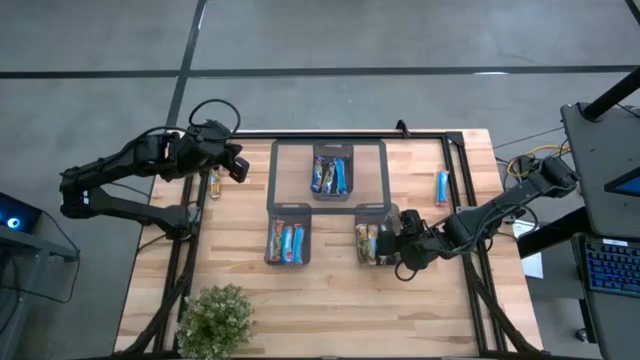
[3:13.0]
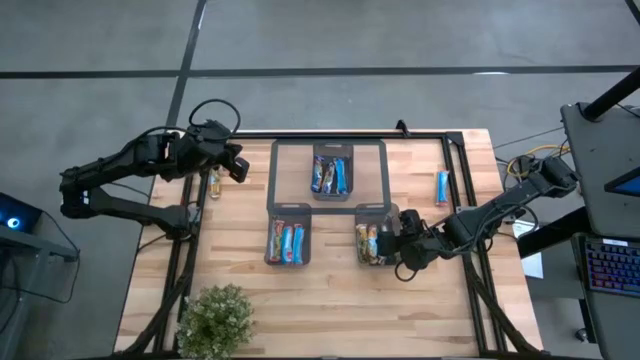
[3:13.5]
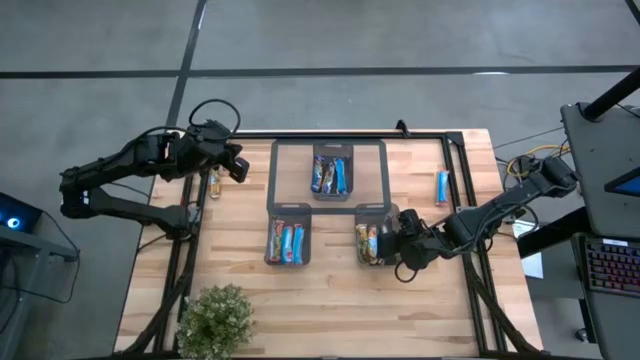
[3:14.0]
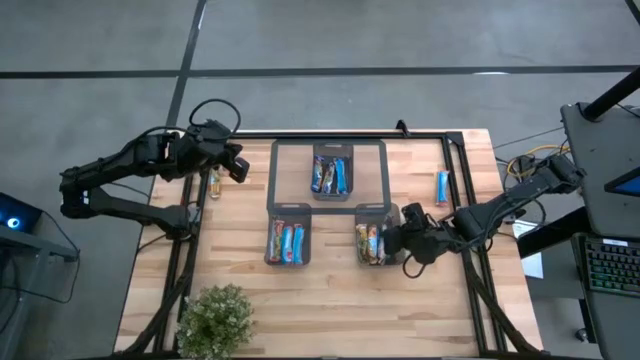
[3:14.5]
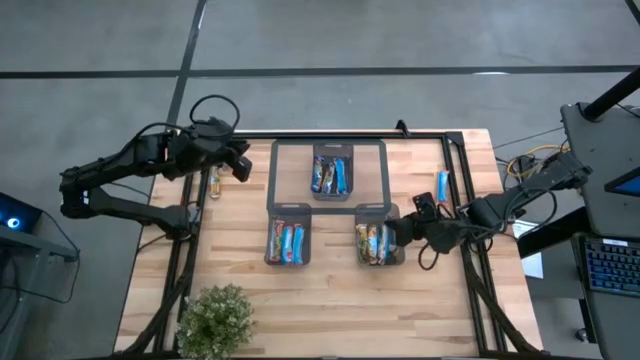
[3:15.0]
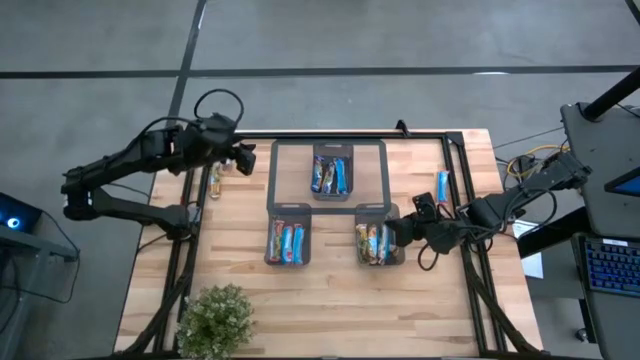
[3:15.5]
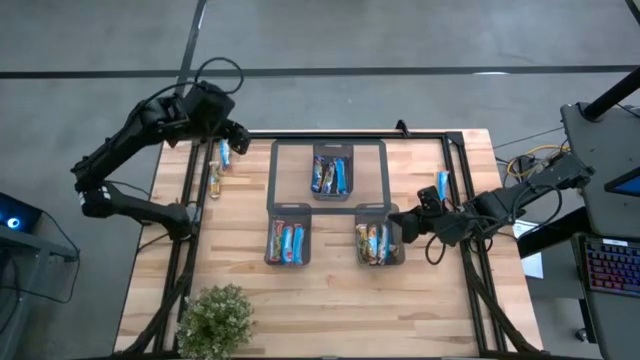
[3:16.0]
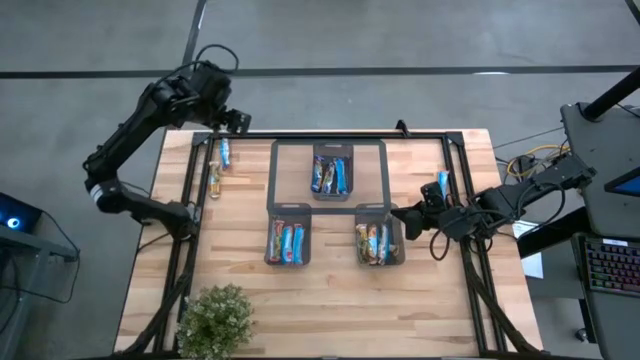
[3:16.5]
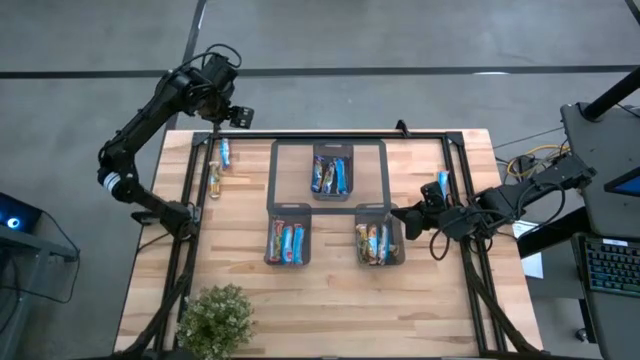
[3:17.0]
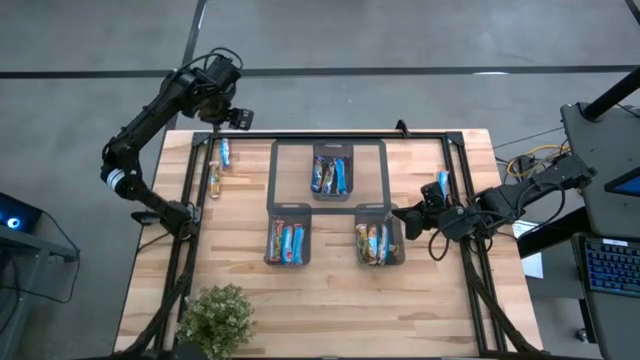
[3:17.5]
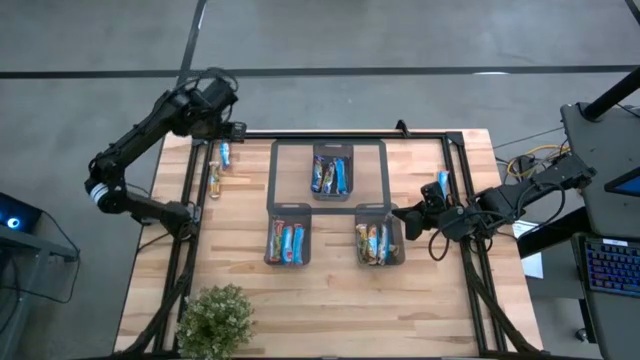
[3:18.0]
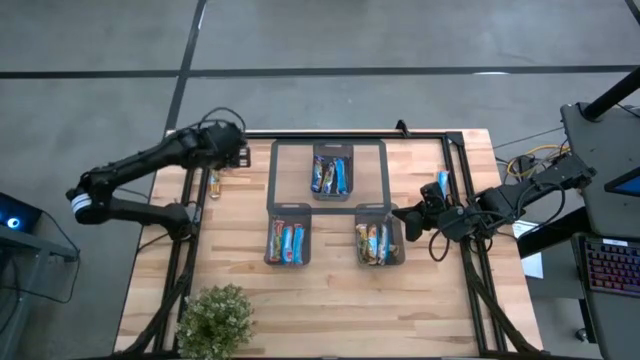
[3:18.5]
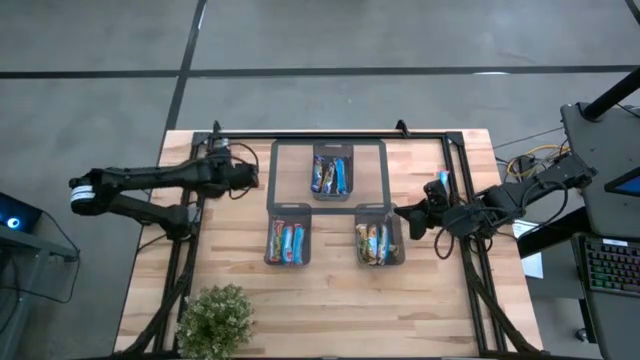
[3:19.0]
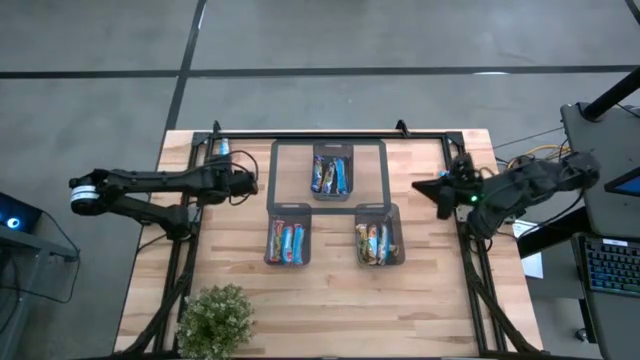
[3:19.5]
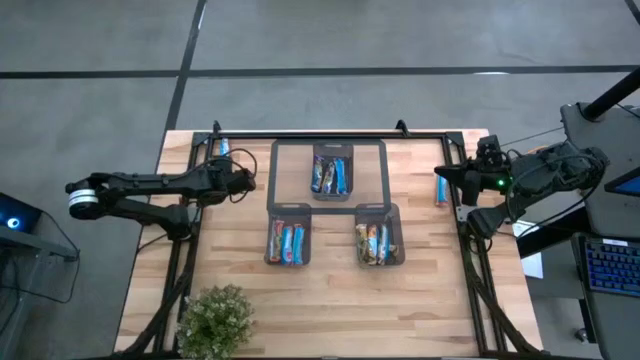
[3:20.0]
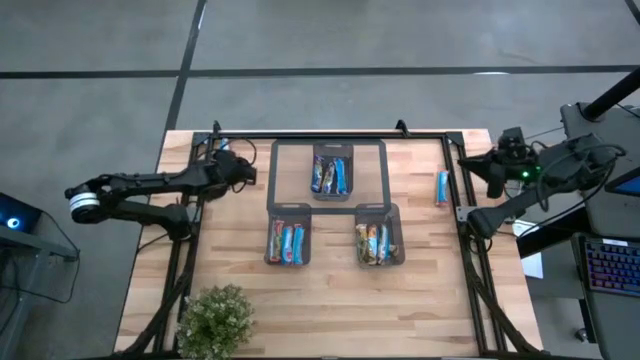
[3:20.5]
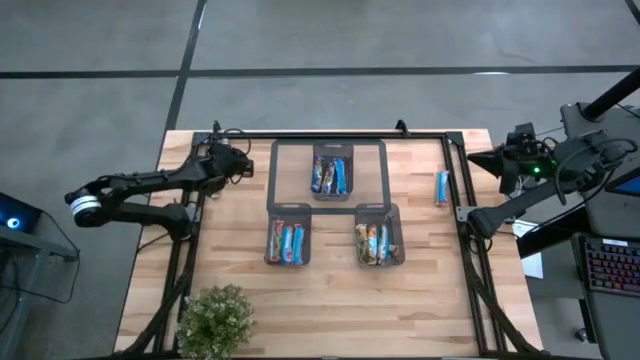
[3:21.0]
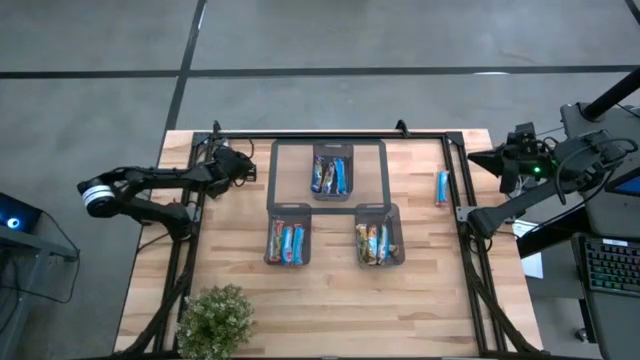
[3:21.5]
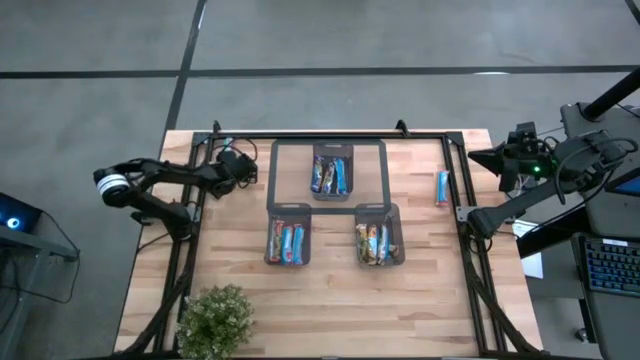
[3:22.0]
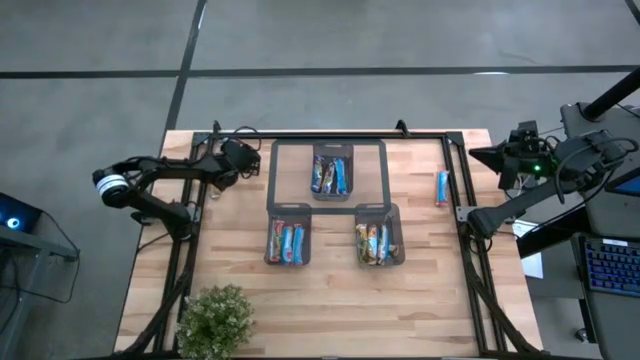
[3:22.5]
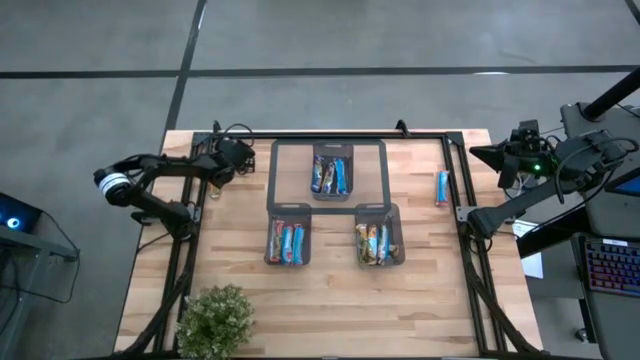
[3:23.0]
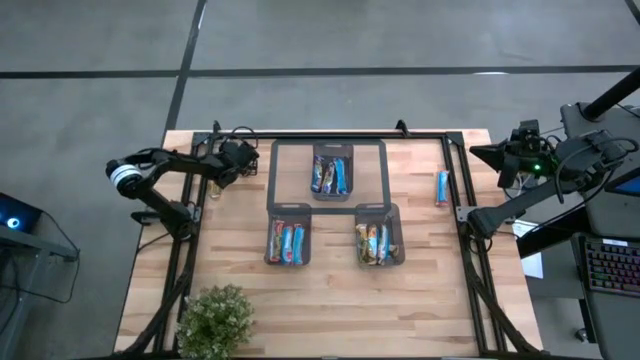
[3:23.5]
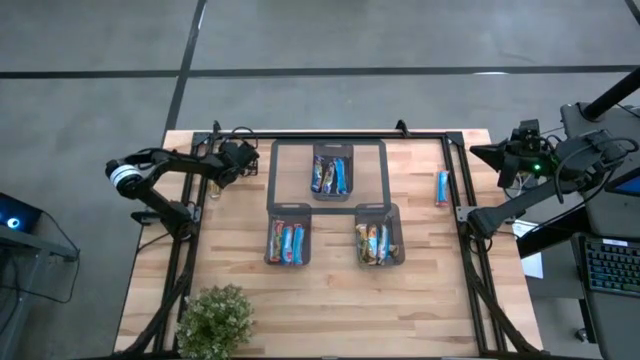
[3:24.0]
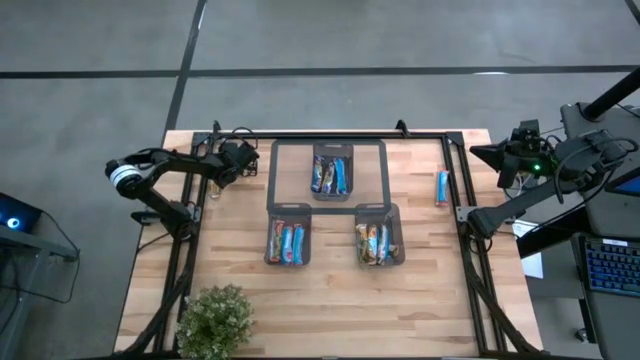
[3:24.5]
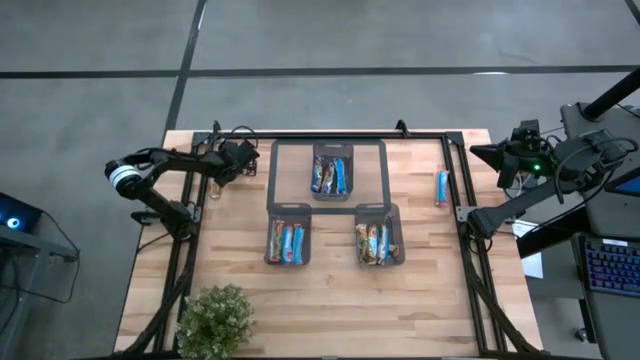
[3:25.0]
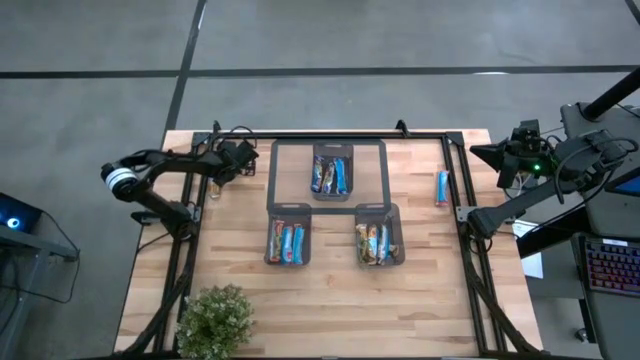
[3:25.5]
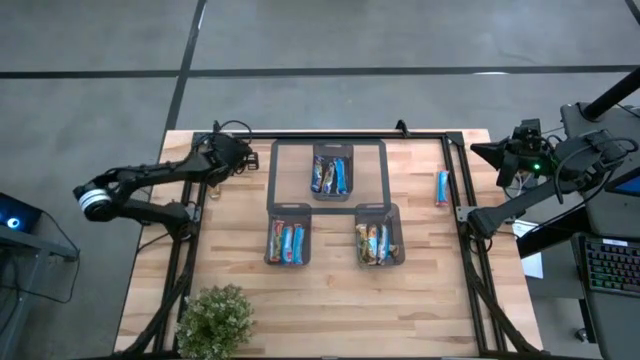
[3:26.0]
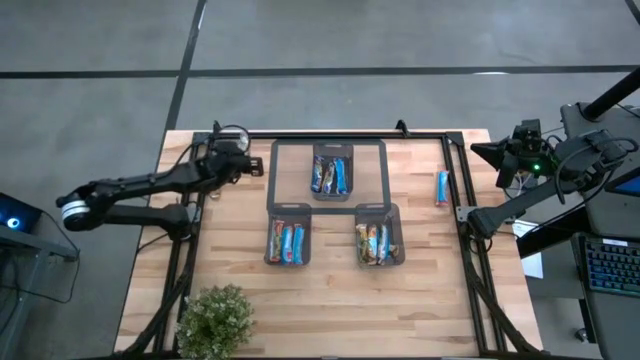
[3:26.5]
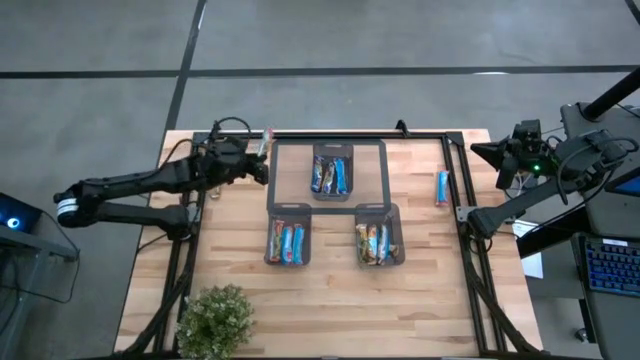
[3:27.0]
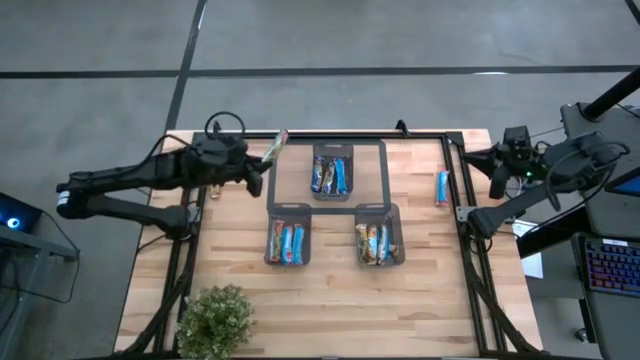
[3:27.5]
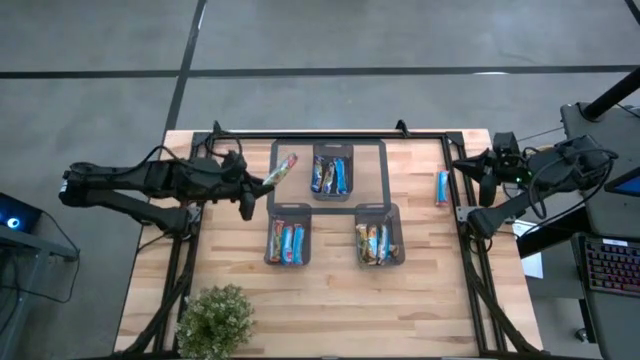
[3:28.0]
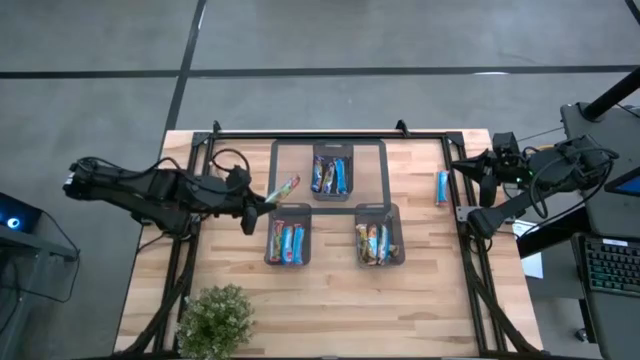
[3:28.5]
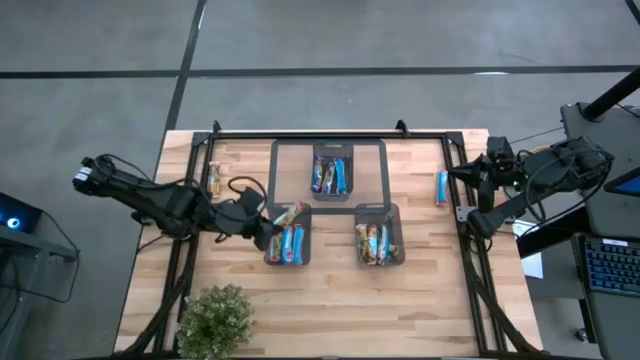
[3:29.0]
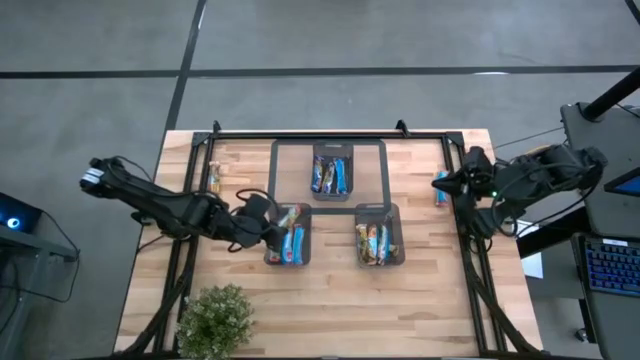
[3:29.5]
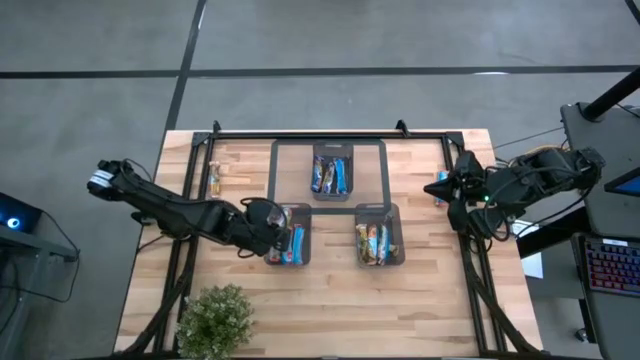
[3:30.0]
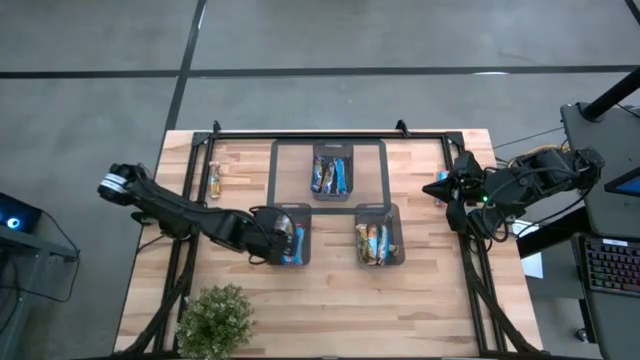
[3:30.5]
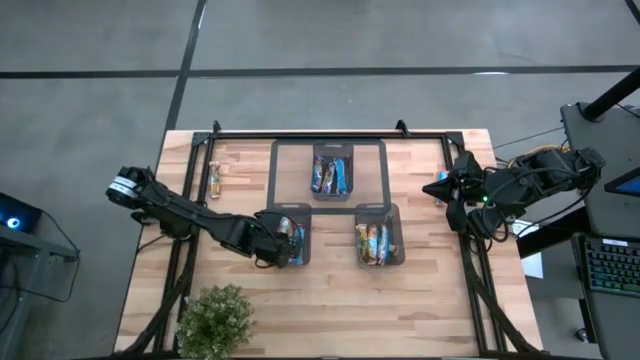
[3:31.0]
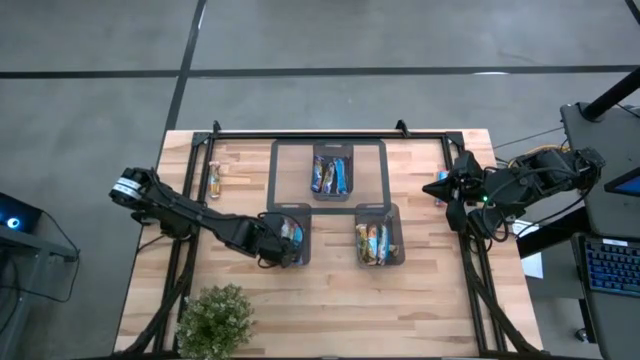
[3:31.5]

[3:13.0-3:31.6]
Task: Pick and place Granola Bars by type
Put the red granola bar into the bottom left black bin

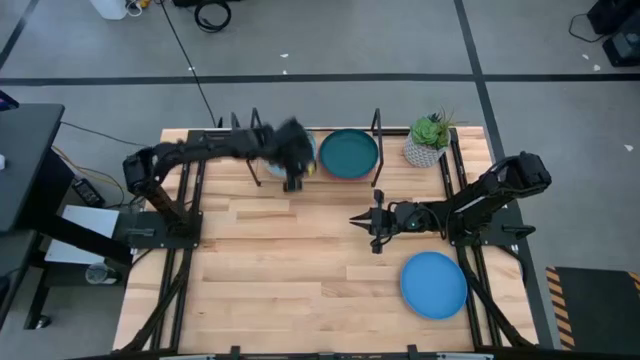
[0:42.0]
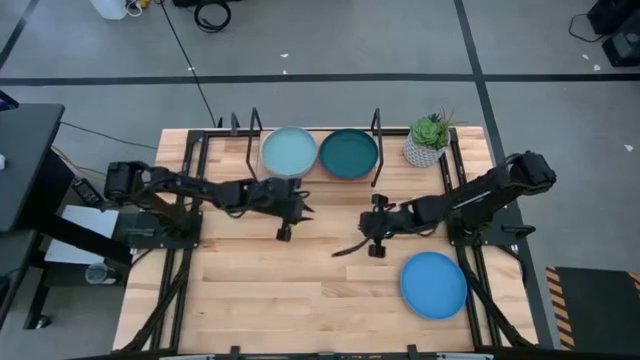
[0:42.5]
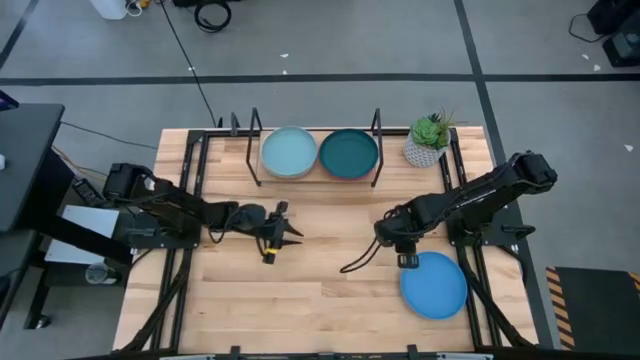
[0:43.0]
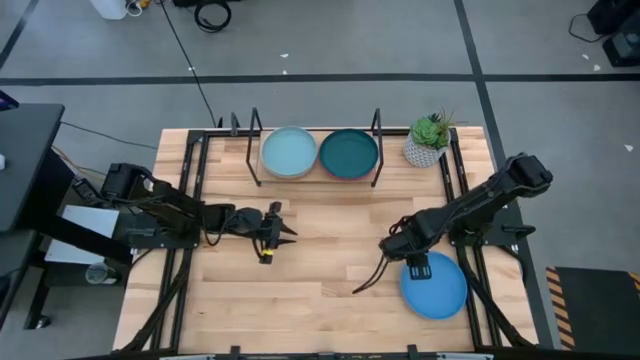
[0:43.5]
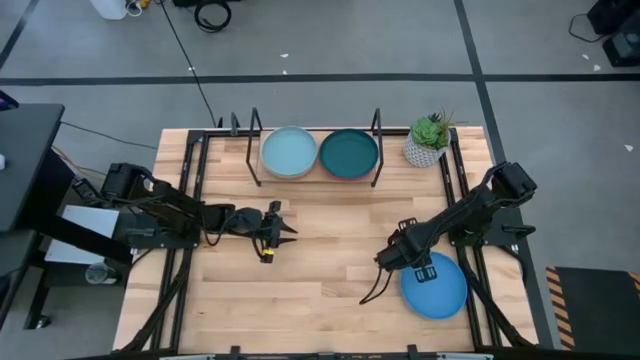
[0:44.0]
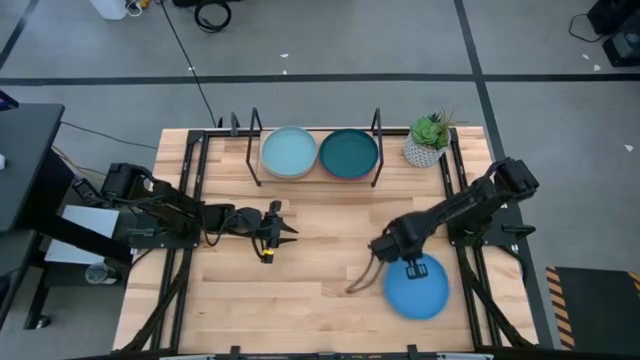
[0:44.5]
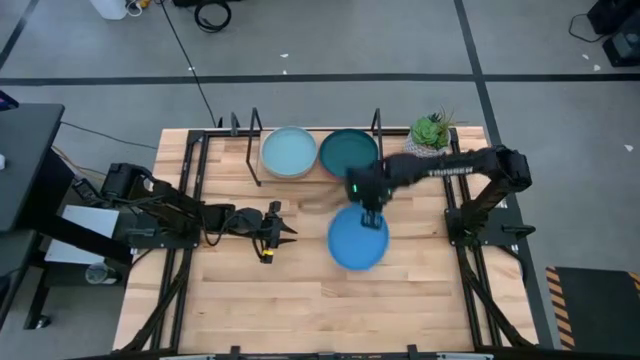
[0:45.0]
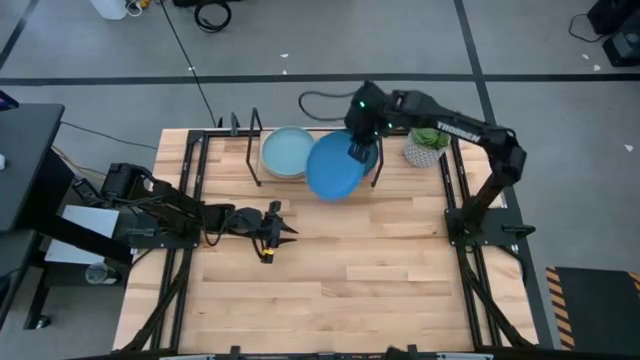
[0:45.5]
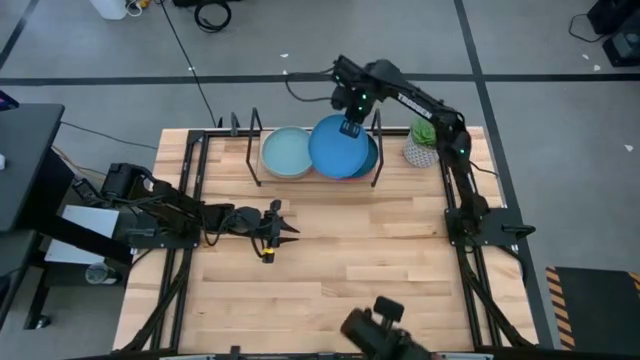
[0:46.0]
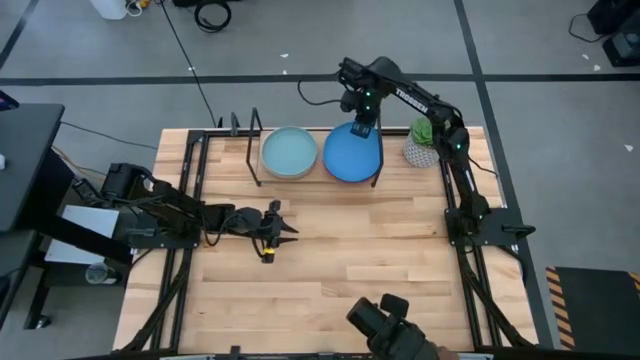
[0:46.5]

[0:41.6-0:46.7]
Task: Place and stack plates onto a shelf
Stack the blue plate on top of the dark green plate on the shelf
